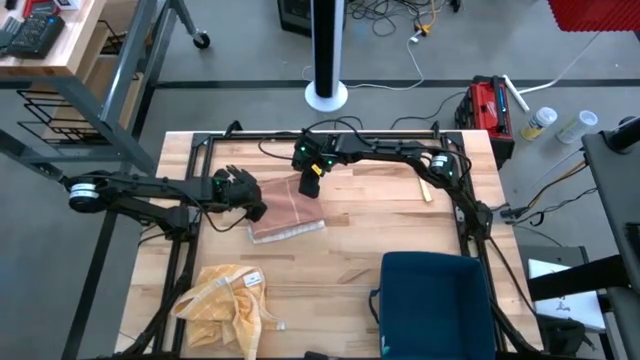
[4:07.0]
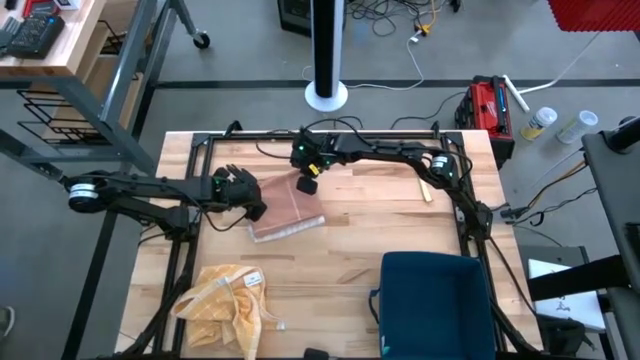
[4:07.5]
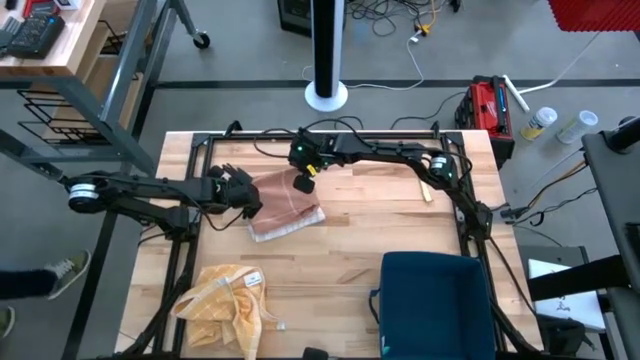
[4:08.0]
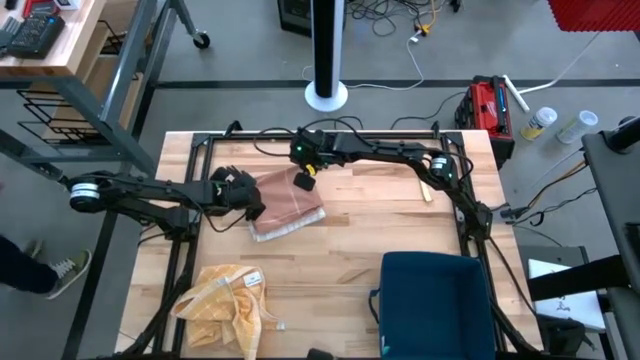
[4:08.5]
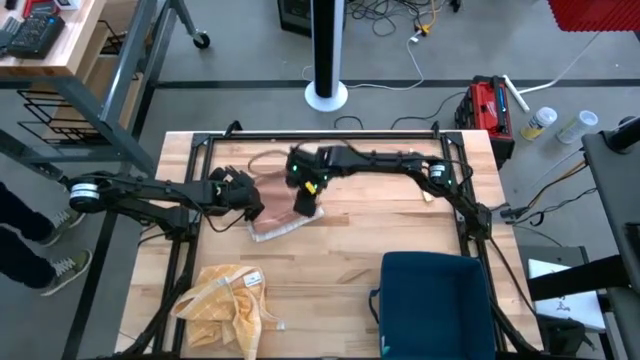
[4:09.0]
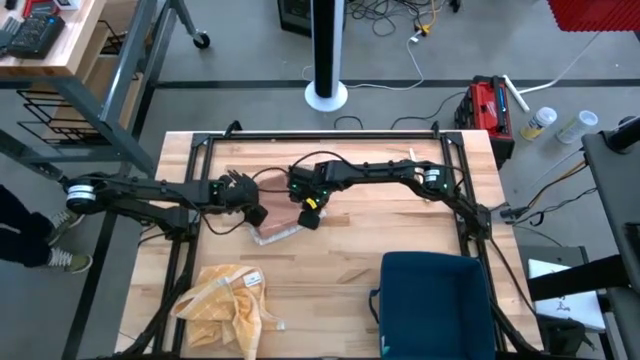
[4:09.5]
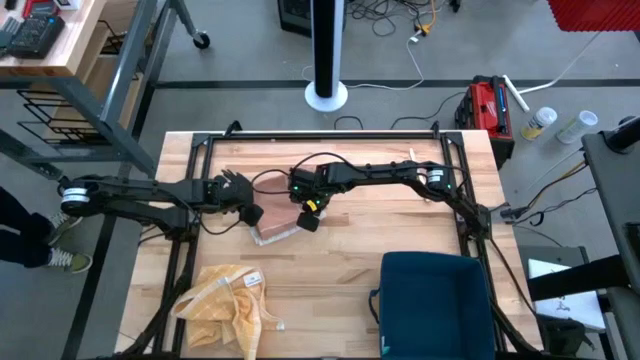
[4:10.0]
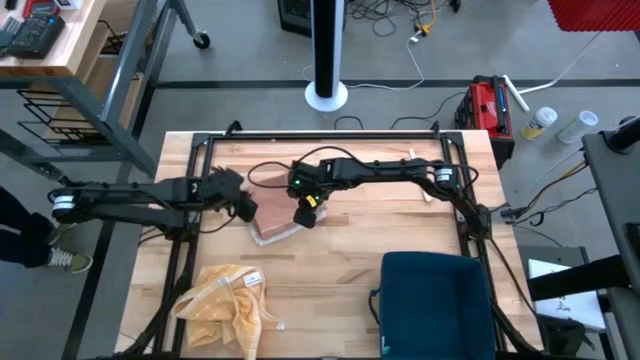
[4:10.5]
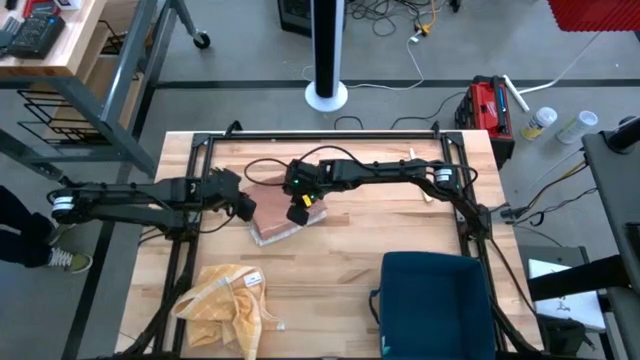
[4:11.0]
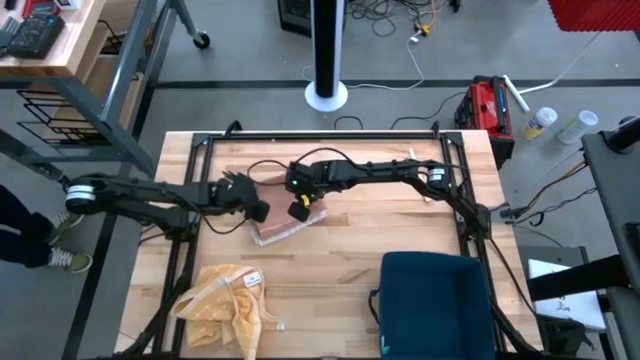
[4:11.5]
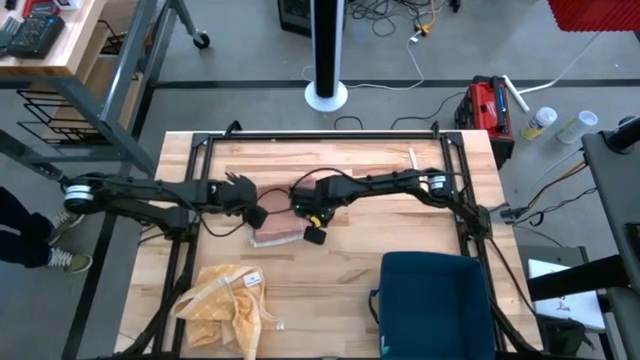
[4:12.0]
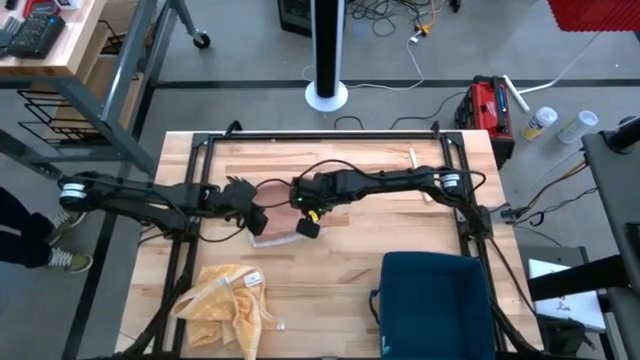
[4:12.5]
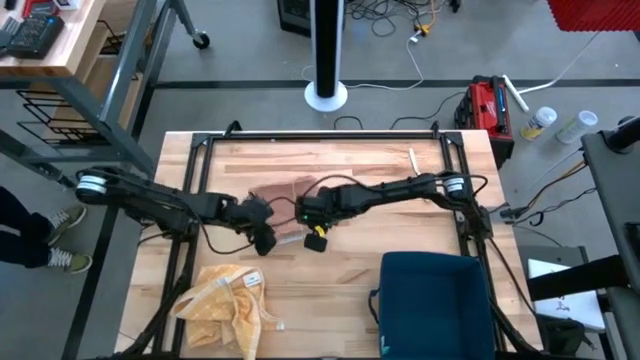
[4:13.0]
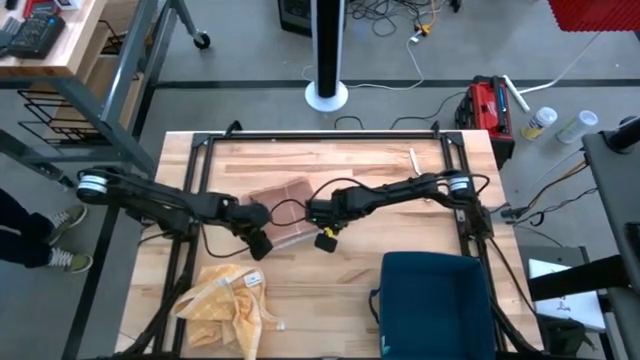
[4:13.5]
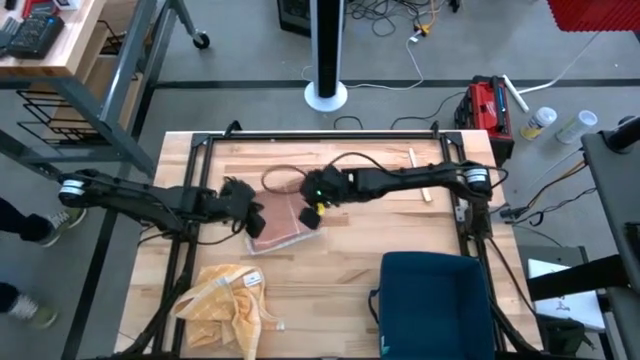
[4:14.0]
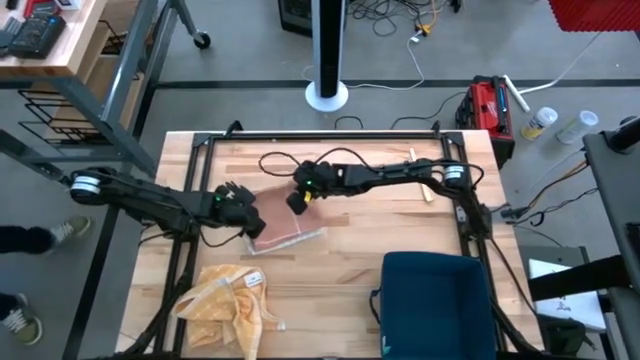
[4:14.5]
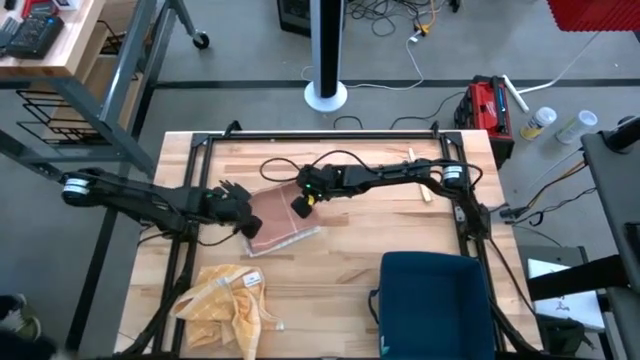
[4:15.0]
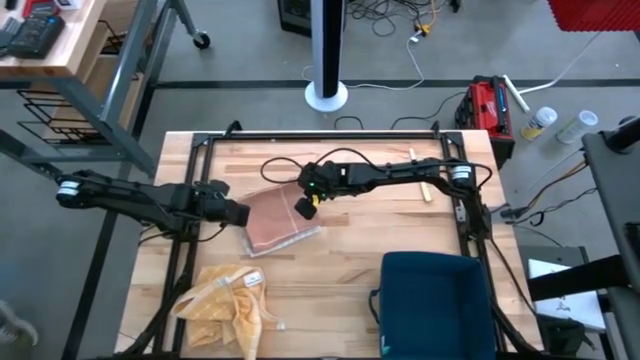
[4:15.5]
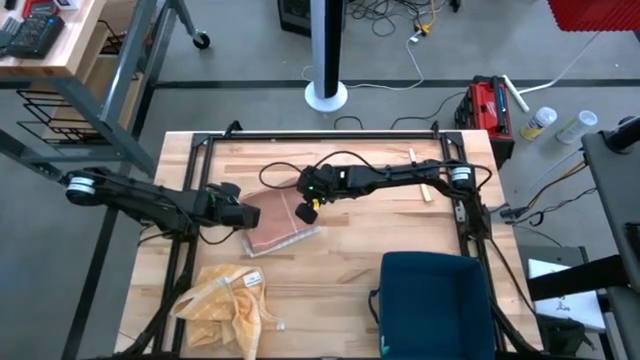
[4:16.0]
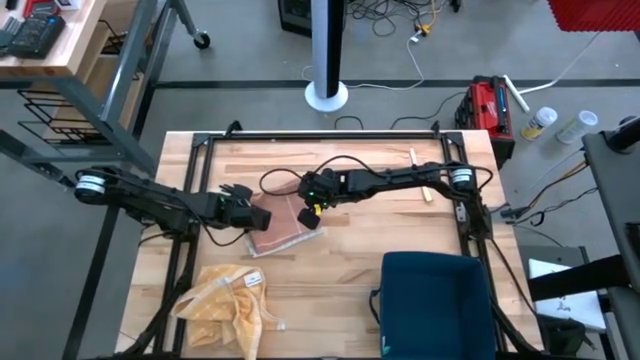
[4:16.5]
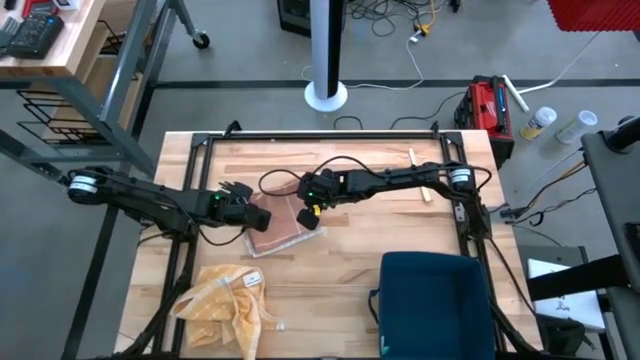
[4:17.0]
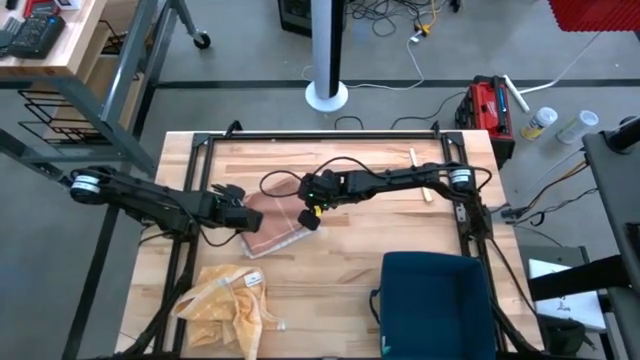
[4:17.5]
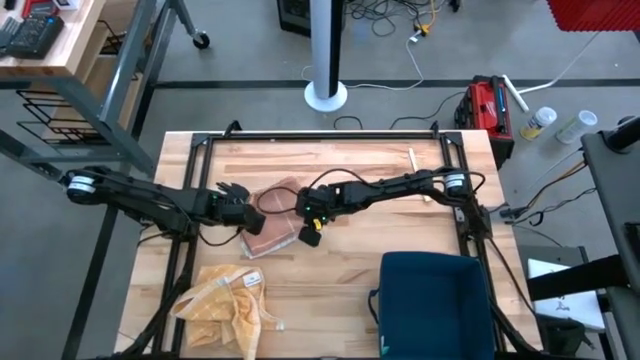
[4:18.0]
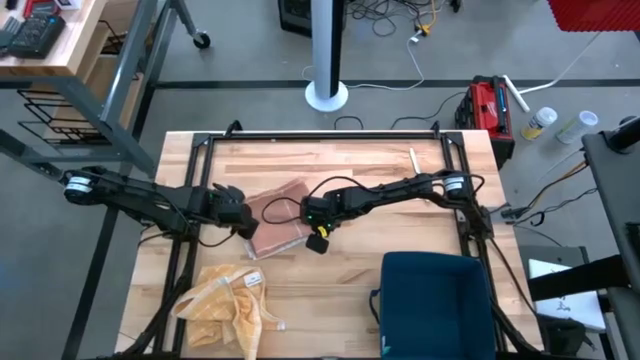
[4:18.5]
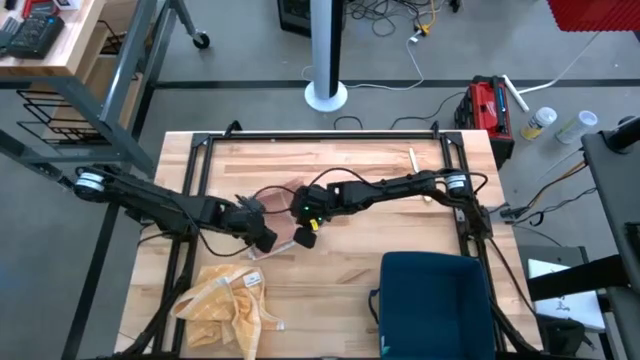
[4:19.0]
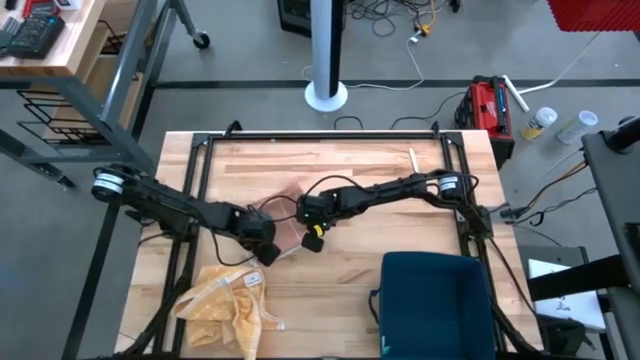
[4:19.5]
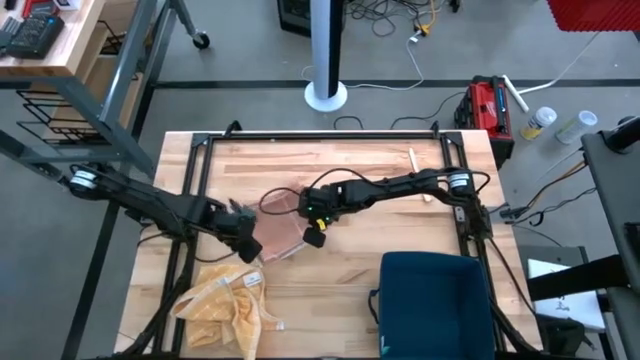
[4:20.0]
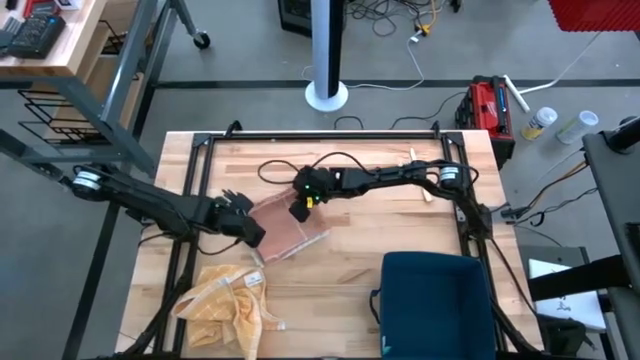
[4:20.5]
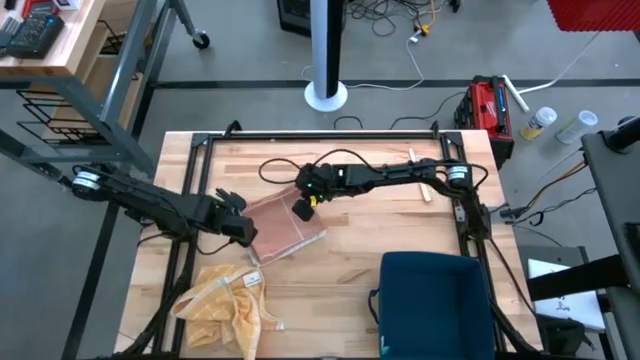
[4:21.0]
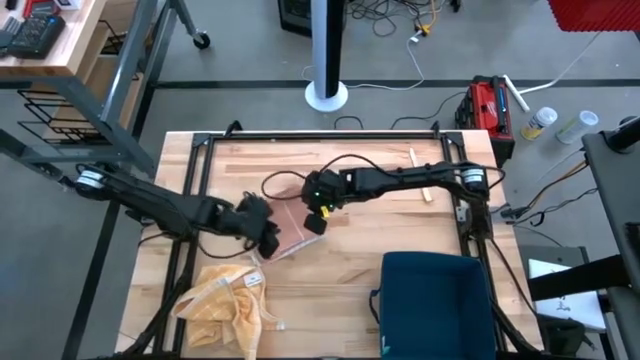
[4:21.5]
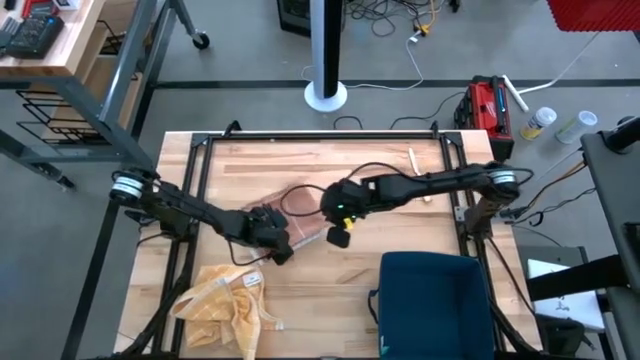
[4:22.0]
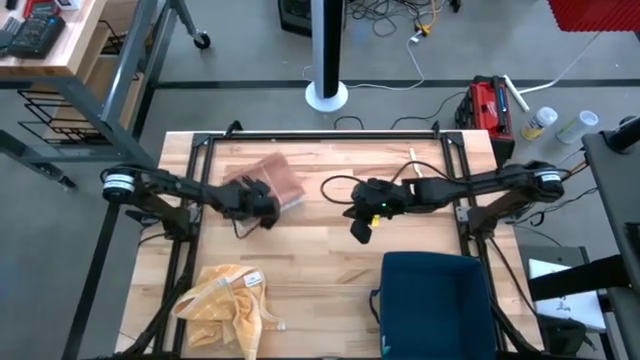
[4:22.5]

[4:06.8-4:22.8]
Task: Fold towel
Stack the brown towel on top of the white towel

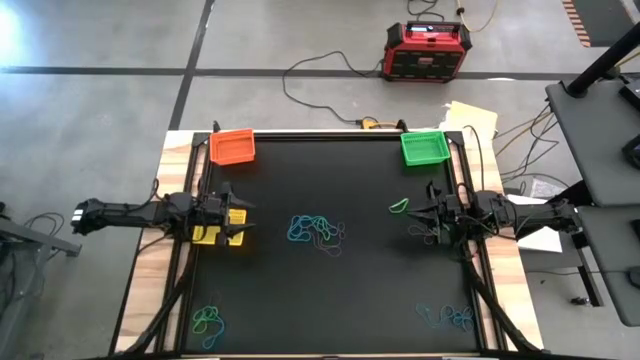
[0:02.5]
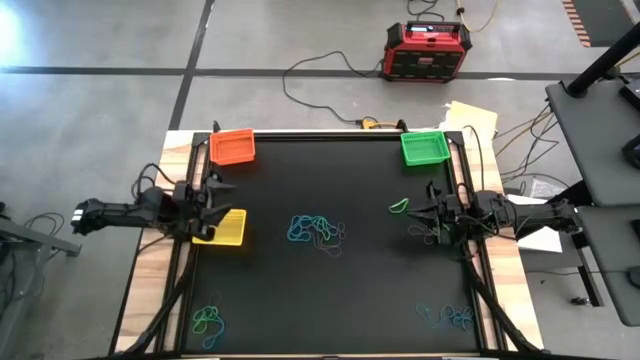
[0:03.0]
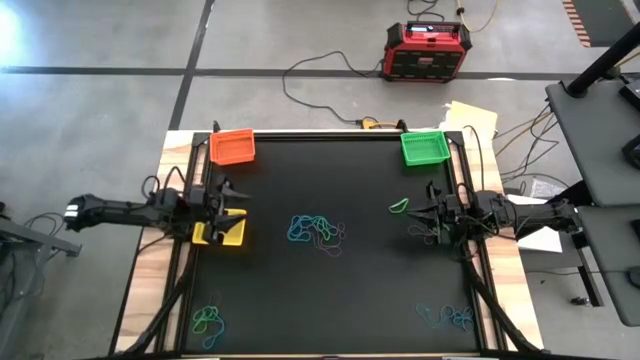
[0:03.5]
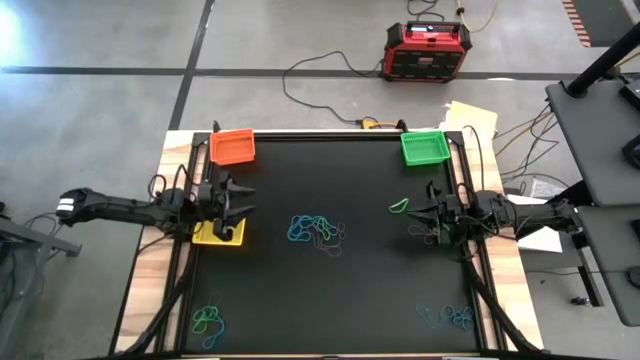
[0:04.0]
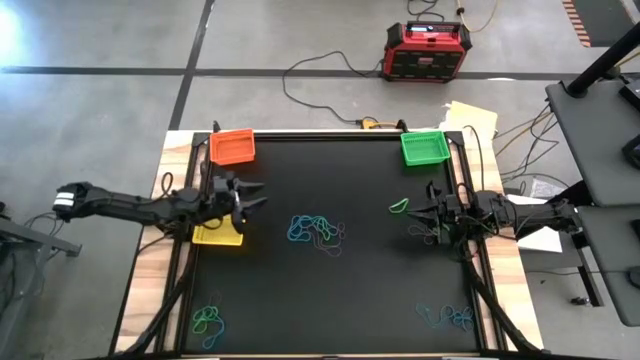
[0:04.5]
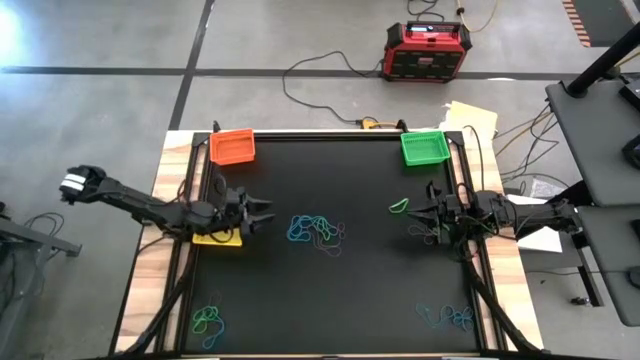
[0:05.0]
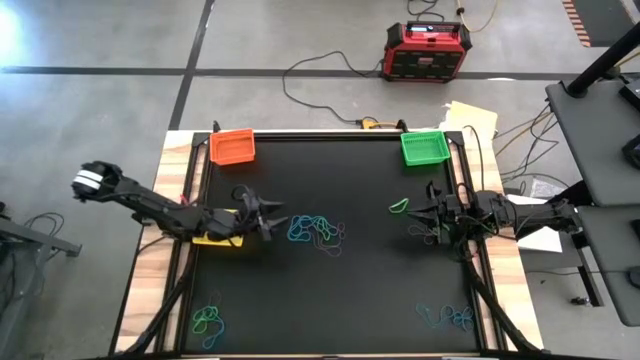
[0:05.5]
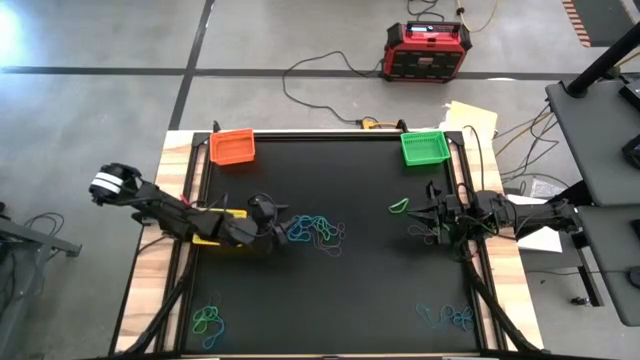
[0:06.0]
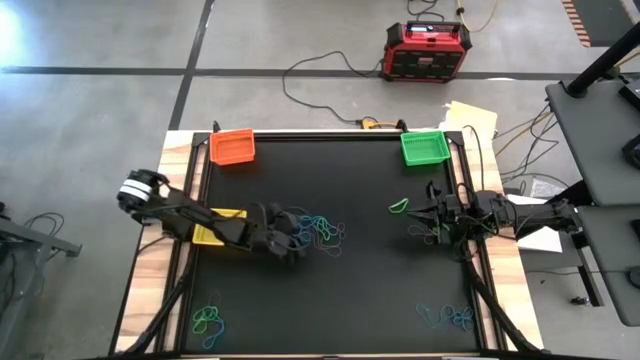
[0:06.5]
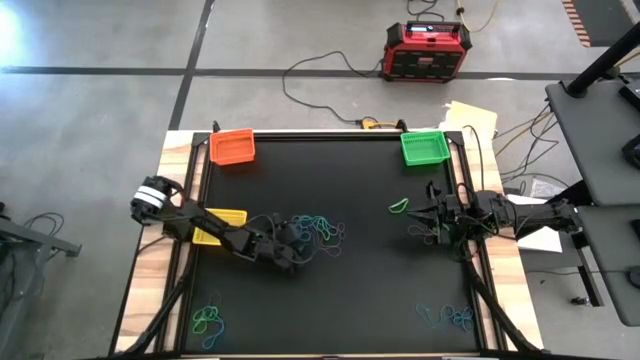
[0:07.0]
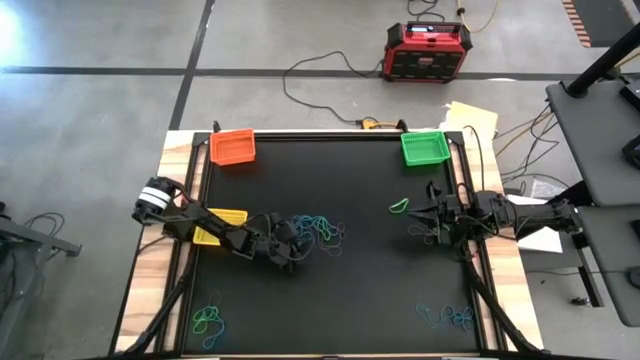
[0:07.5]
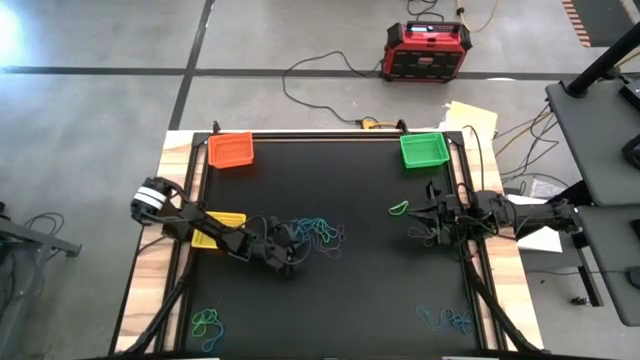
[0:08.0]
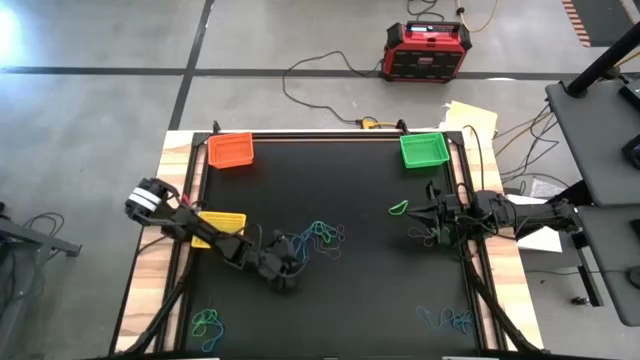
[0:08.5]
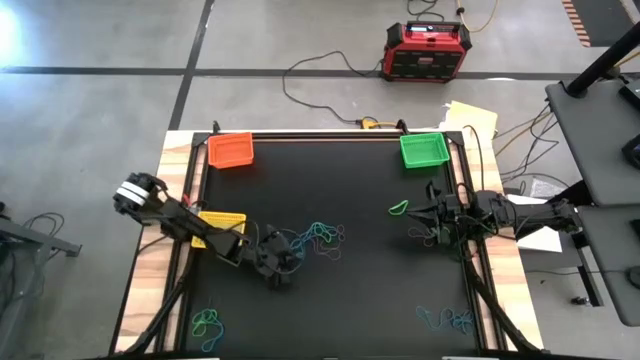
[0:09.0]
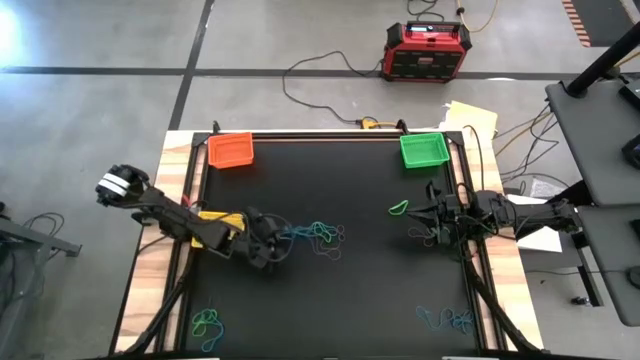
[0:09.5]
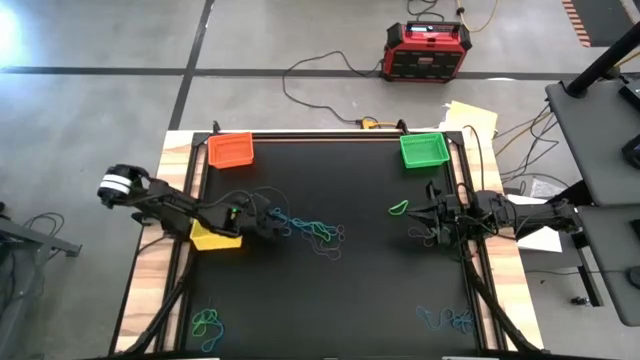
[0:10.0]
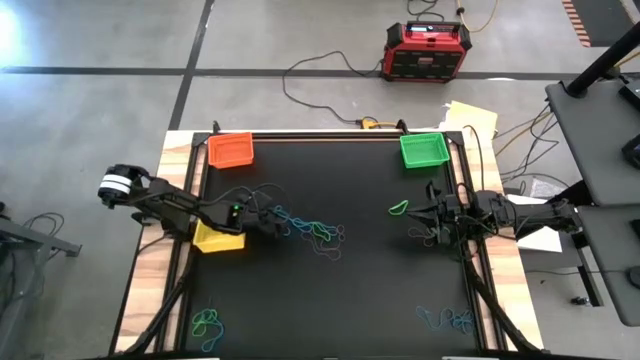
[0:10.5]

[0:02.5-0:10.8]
Task: Sort rubber bands into baskets
Put the blue rubber band into the yellow bin
